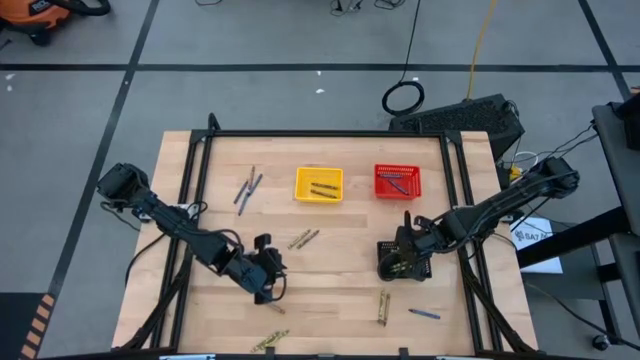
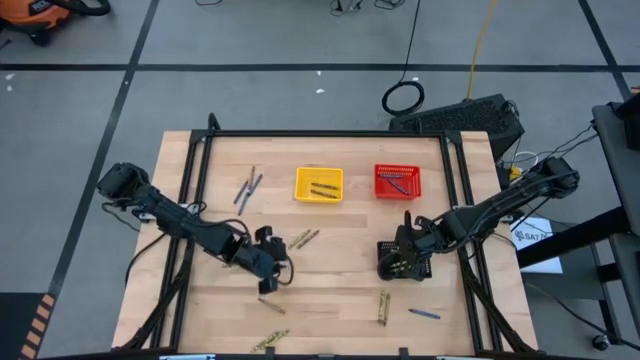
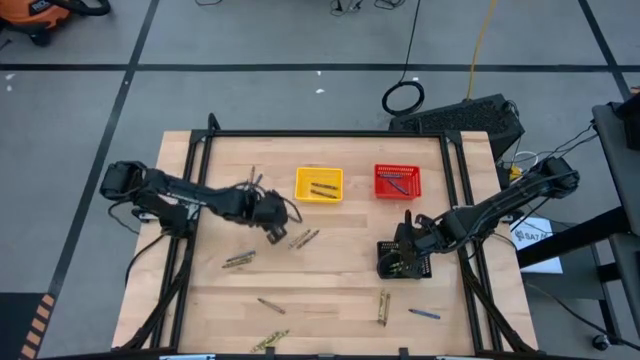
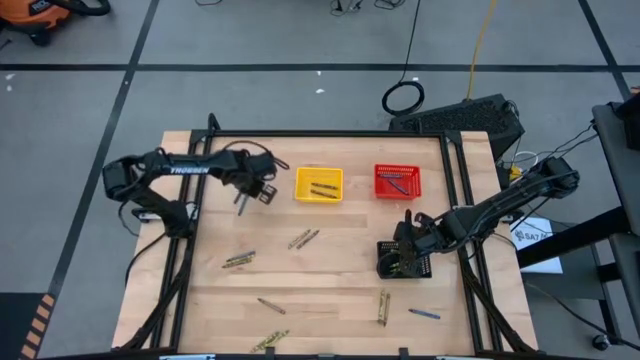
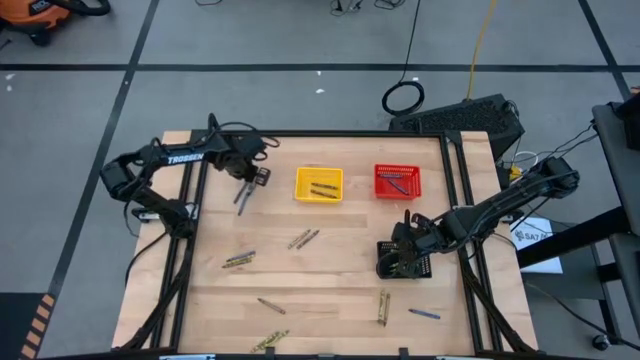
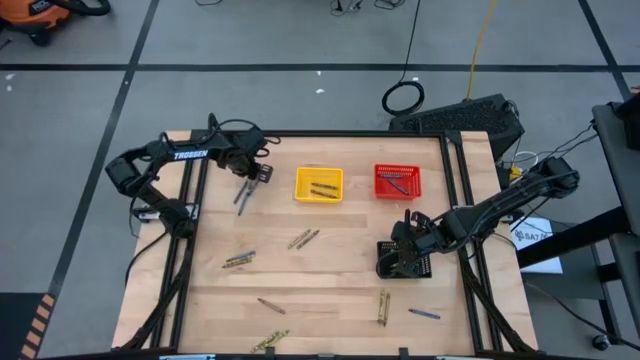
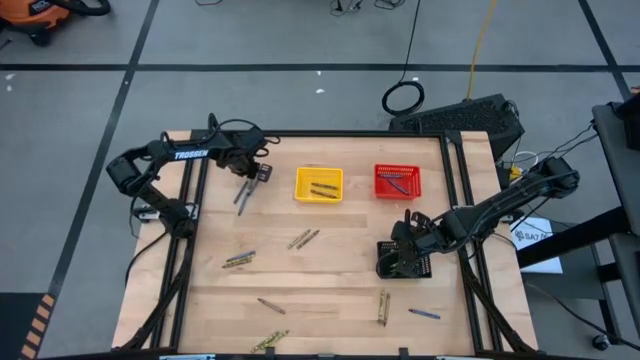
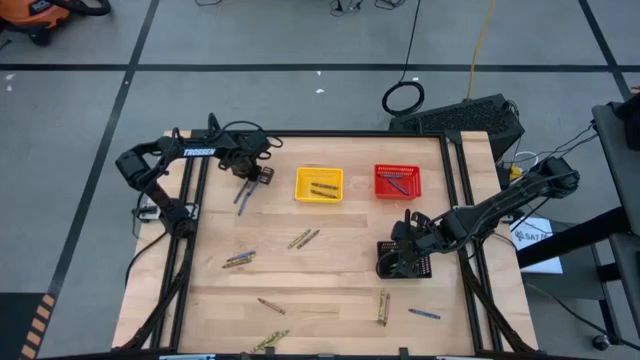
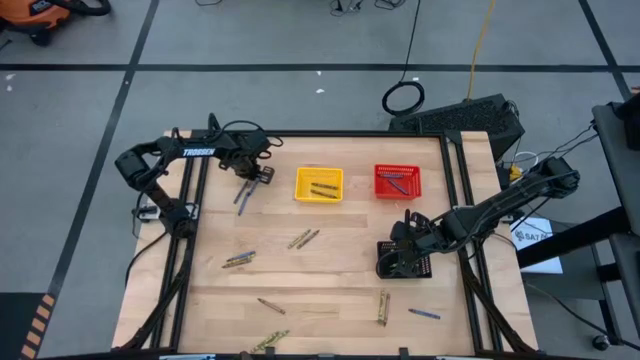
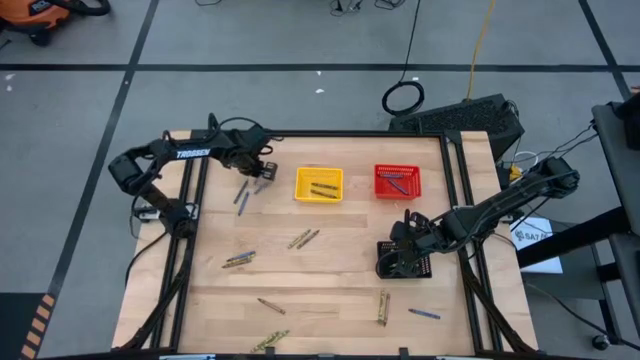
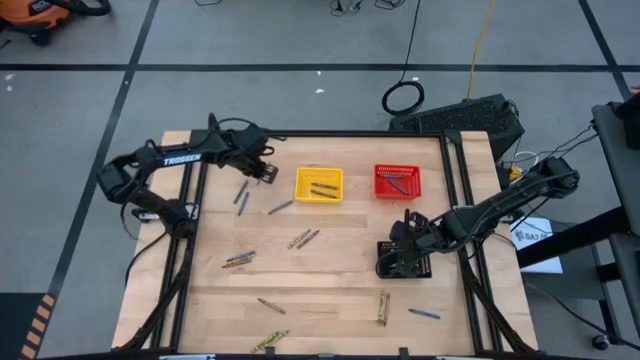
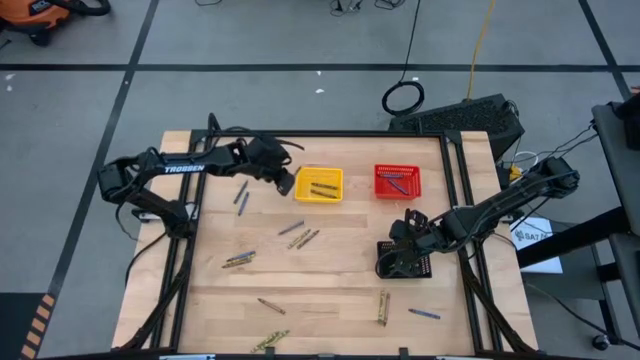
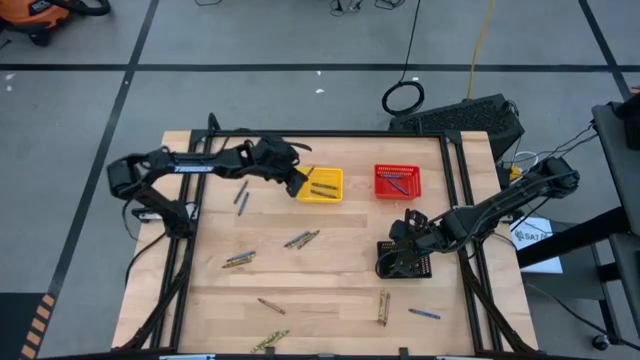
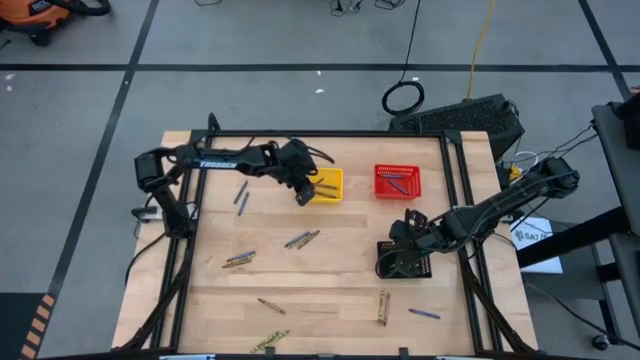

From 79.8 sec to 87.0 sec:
Task: Sort crayons
Put the brown crayon into the yellow bin

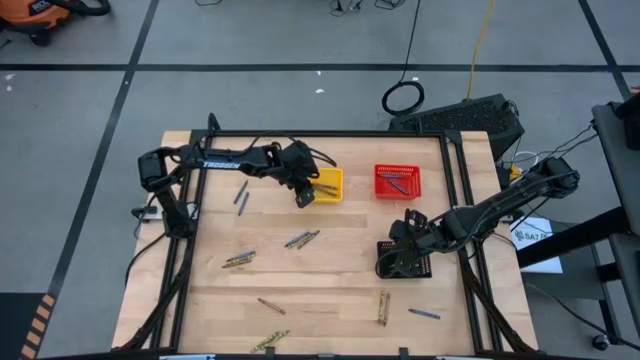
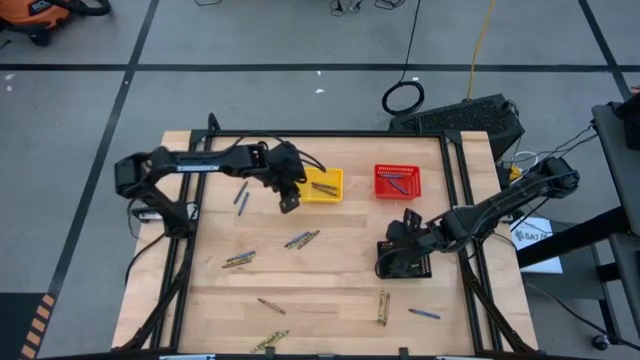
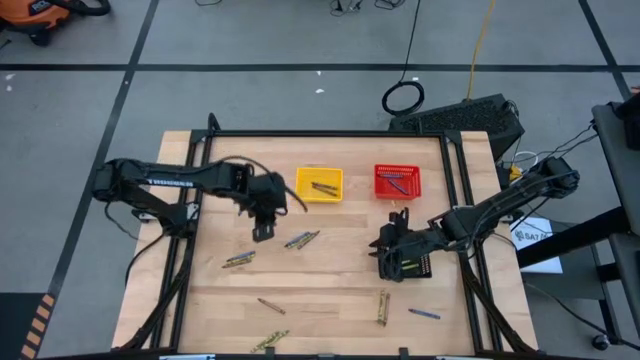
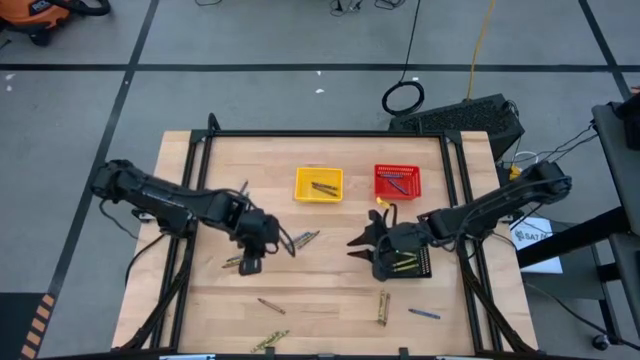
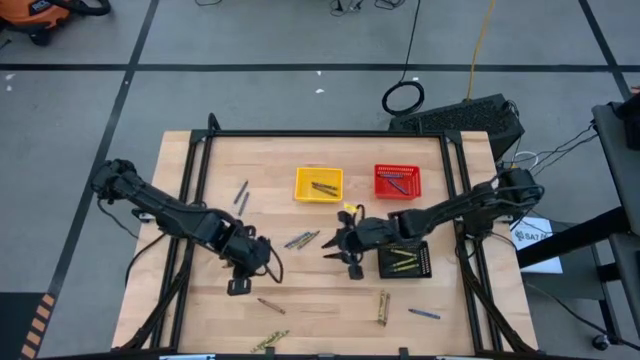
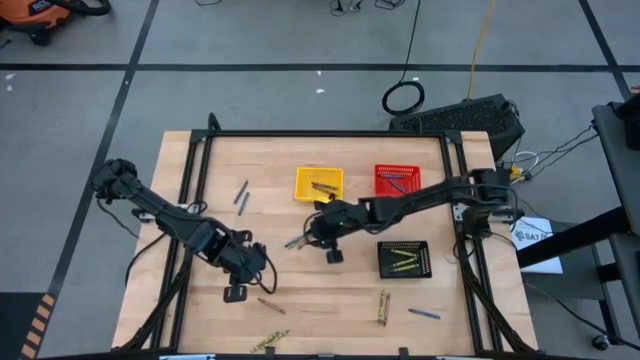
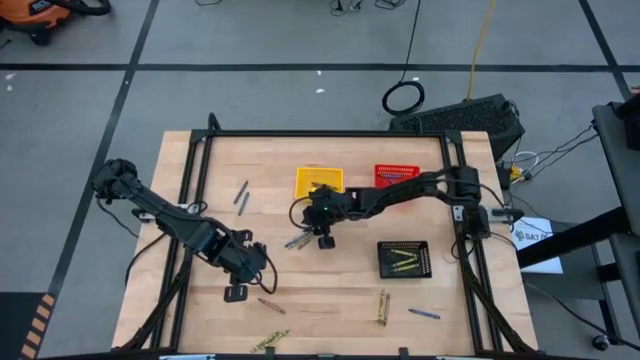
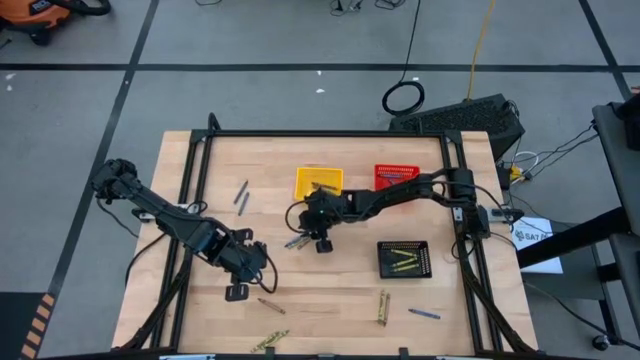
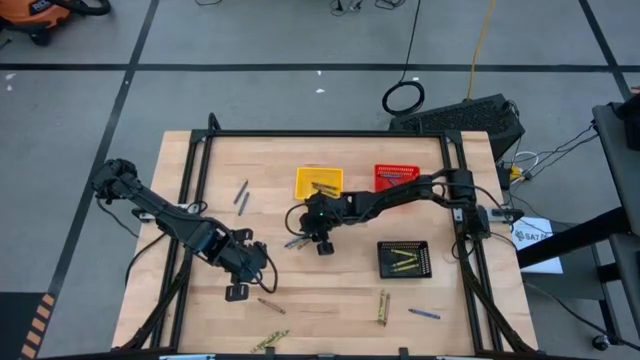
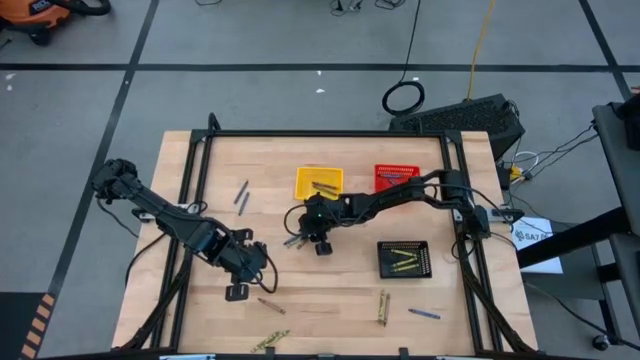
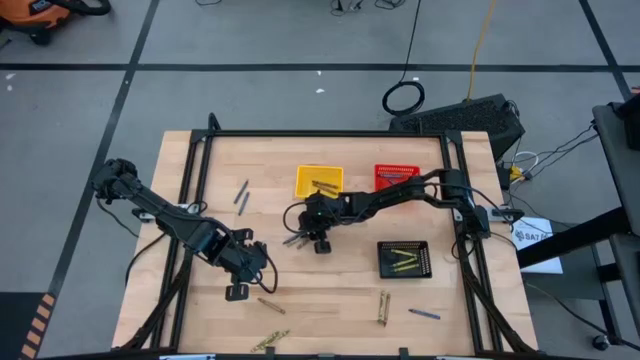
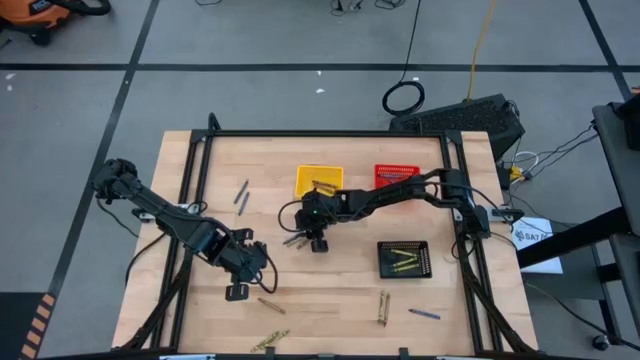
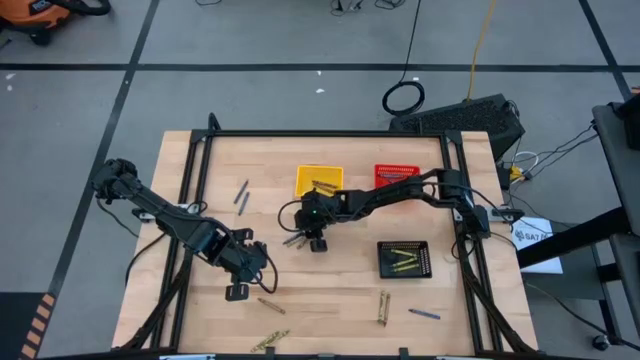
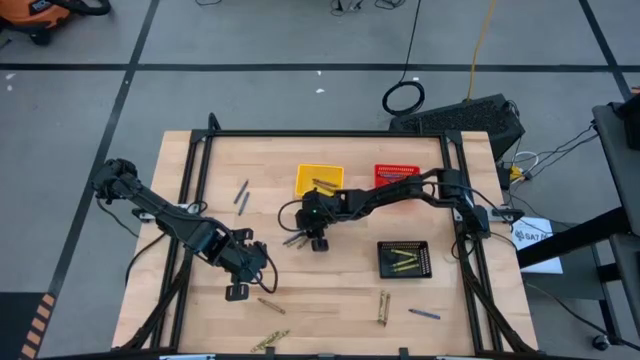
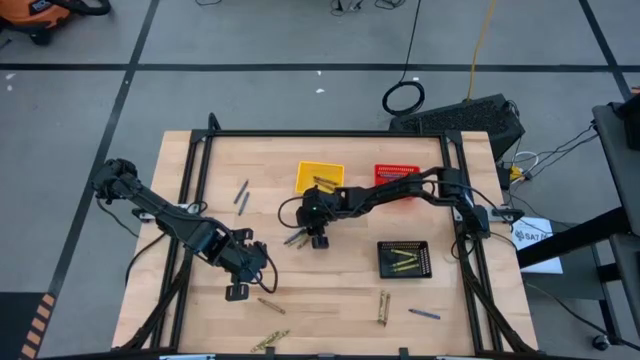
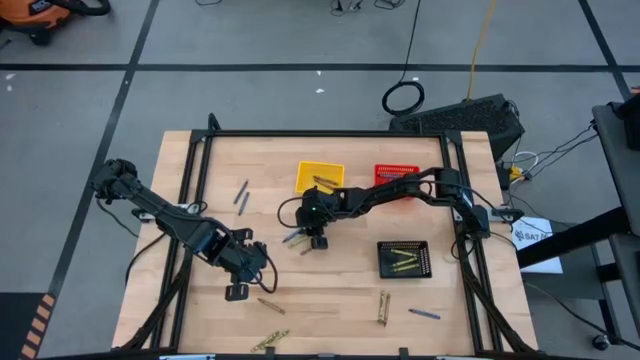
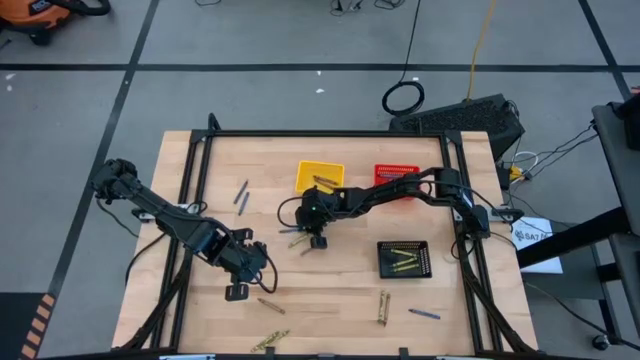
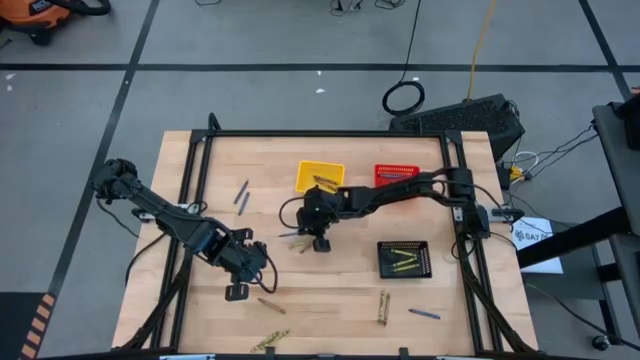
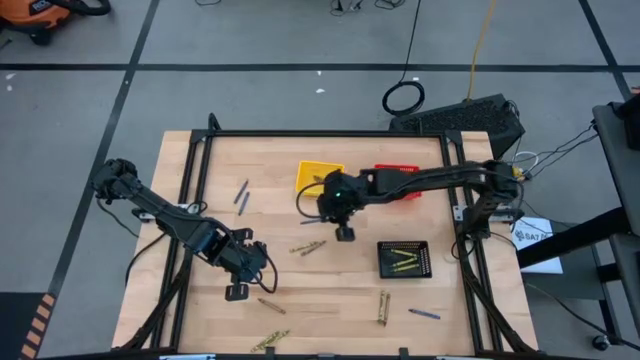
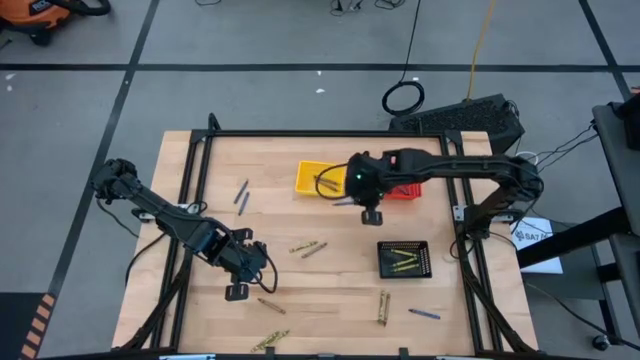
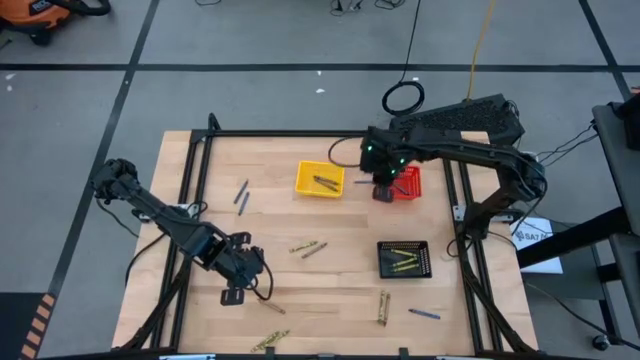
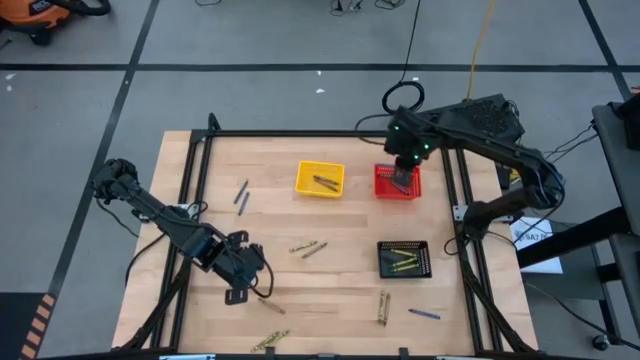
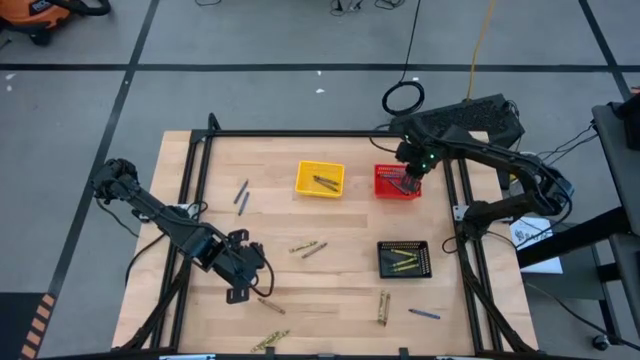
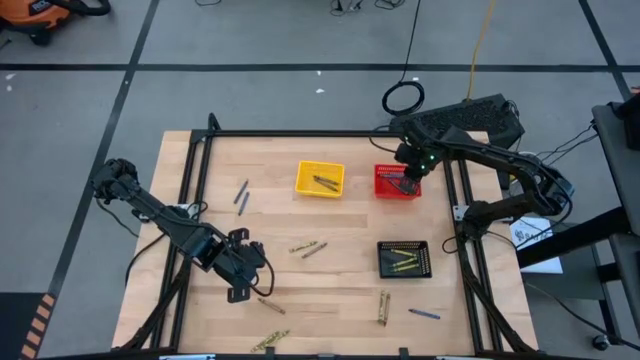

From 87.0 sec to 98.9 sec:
Put the blue crayon into the red bin

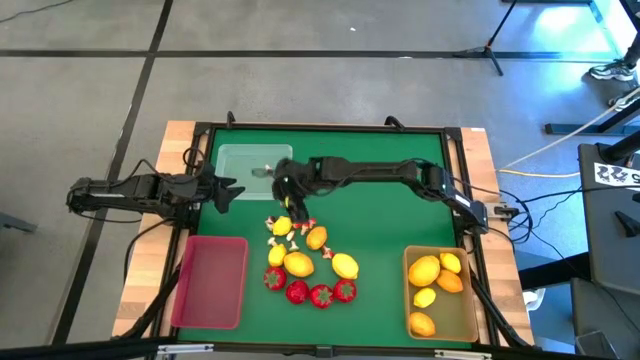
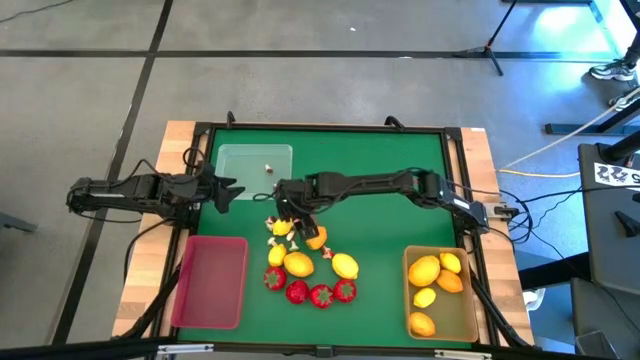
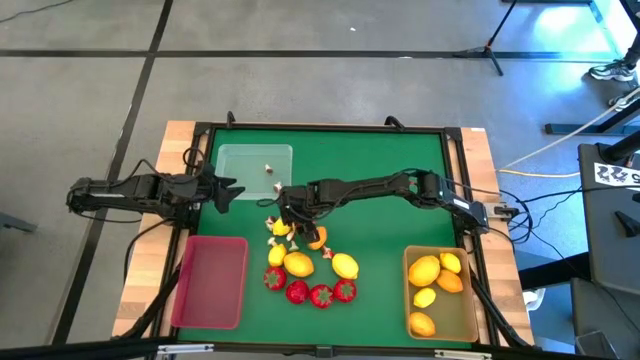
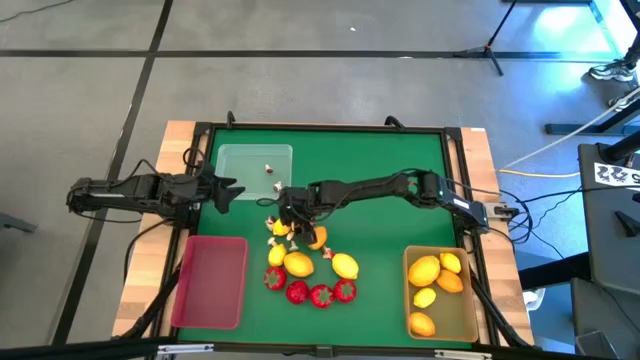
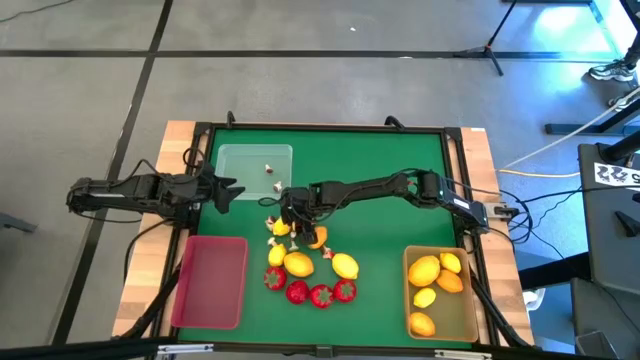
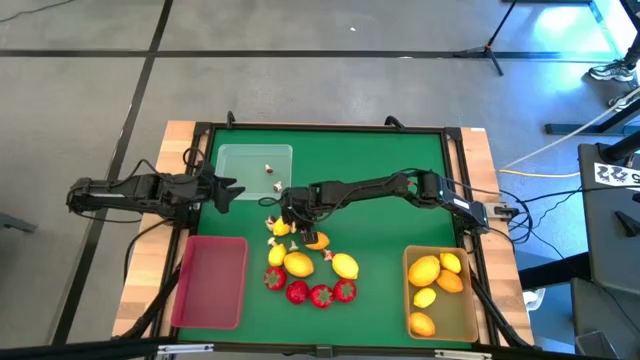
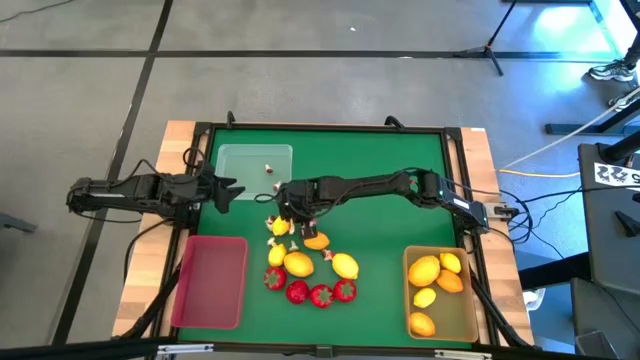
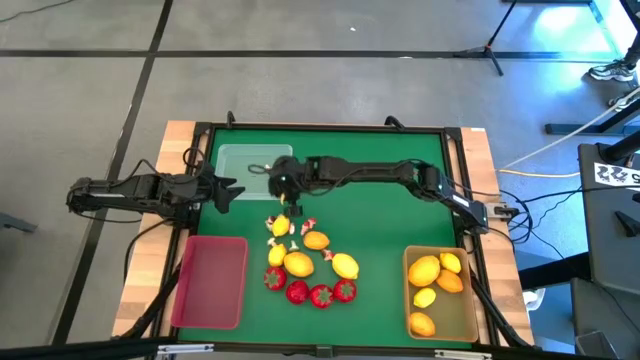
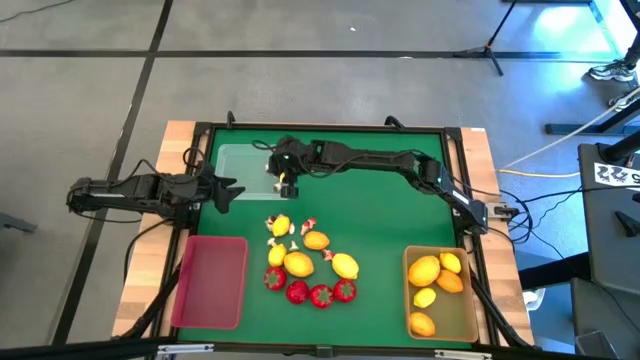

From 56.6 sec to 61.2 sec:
Task: Sort produce into baskets
Put the red mushroom into the transparent bin
